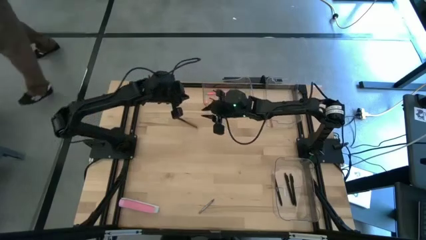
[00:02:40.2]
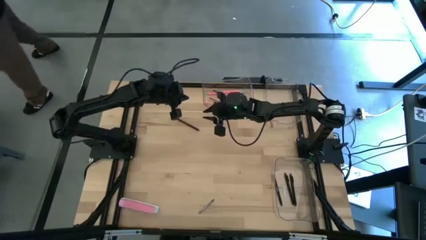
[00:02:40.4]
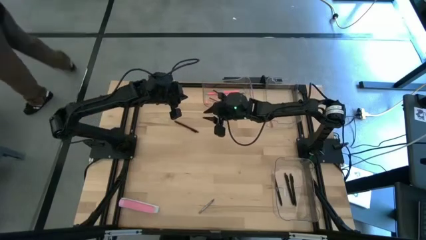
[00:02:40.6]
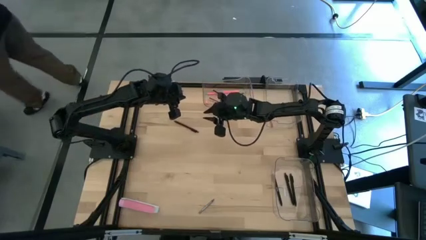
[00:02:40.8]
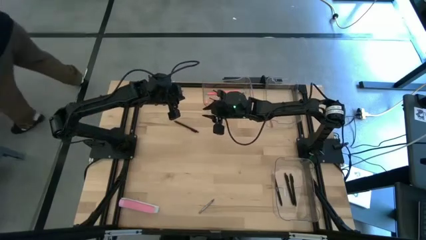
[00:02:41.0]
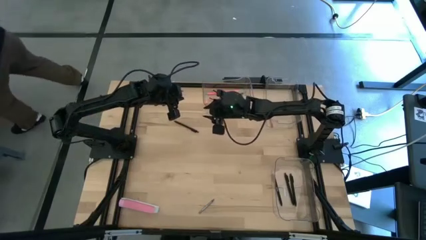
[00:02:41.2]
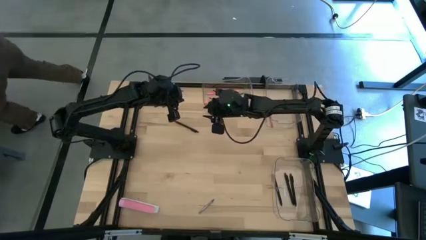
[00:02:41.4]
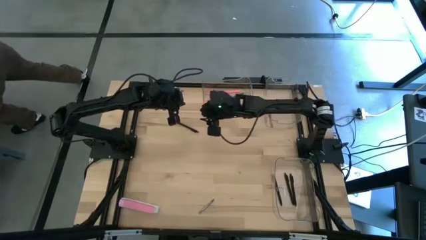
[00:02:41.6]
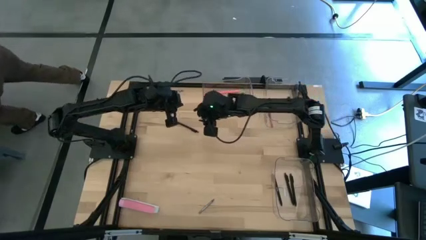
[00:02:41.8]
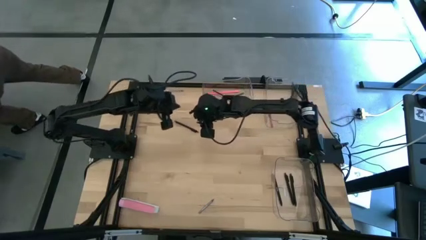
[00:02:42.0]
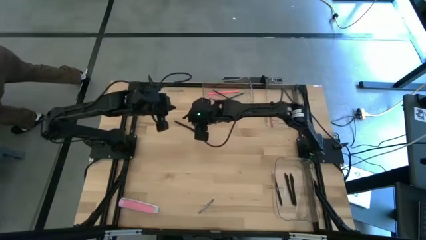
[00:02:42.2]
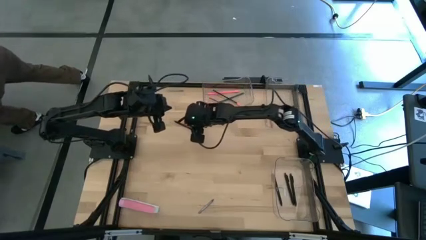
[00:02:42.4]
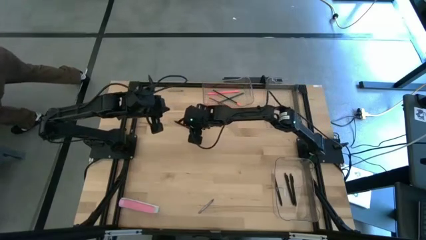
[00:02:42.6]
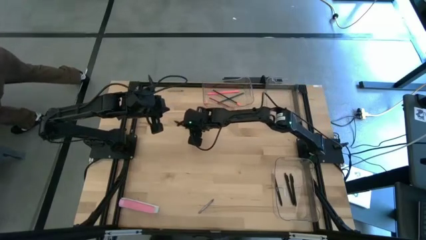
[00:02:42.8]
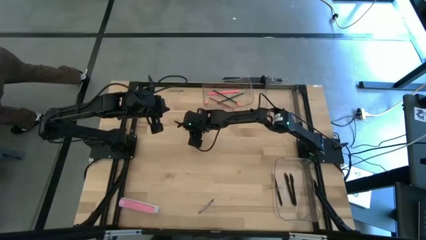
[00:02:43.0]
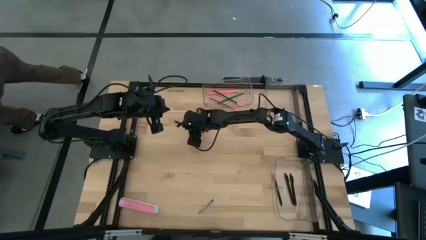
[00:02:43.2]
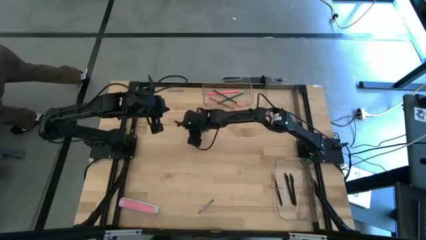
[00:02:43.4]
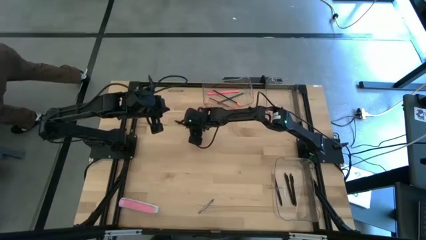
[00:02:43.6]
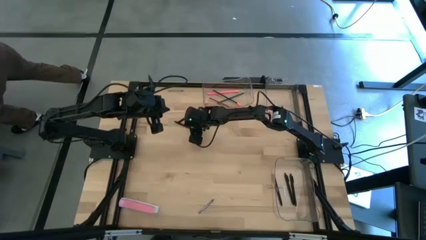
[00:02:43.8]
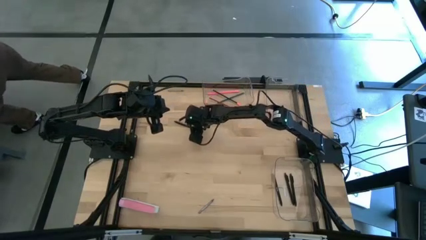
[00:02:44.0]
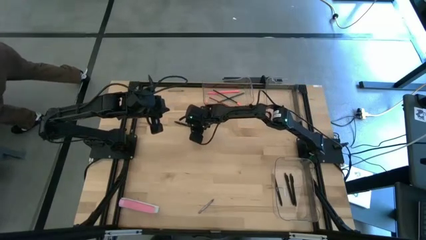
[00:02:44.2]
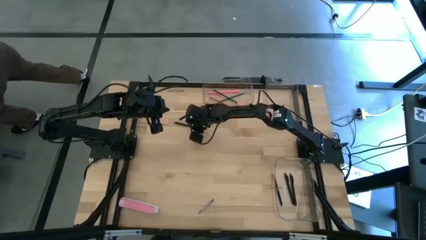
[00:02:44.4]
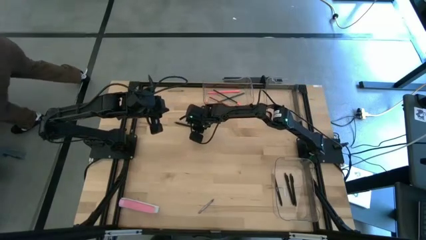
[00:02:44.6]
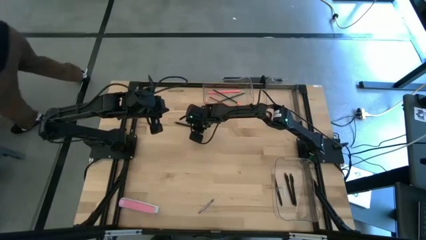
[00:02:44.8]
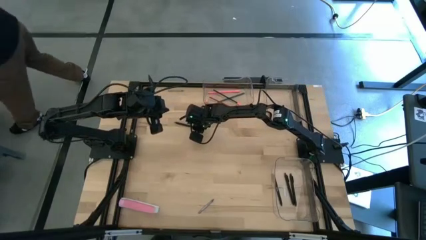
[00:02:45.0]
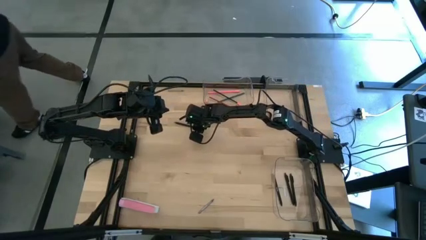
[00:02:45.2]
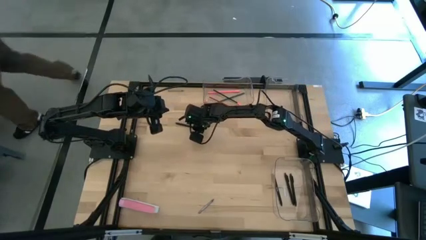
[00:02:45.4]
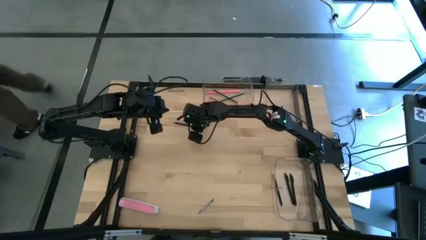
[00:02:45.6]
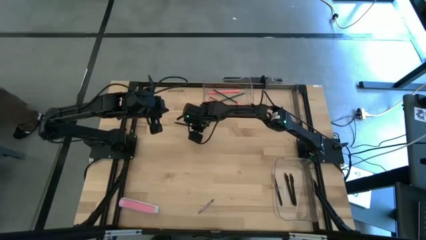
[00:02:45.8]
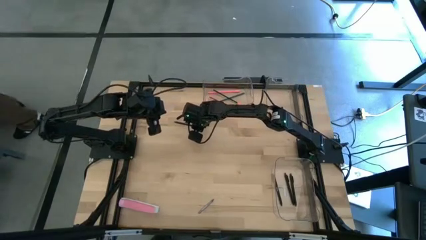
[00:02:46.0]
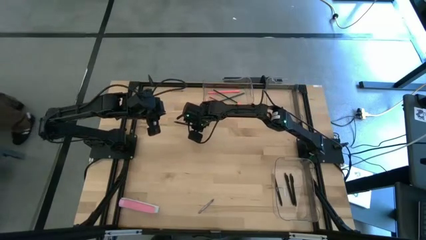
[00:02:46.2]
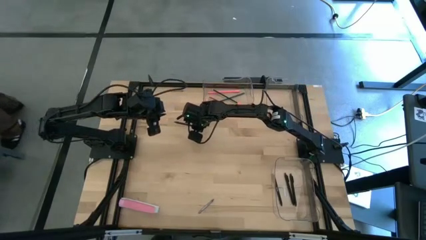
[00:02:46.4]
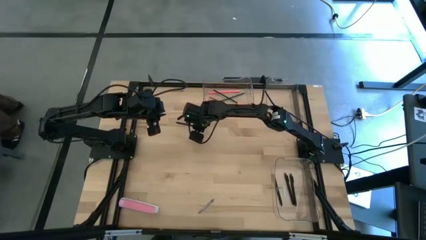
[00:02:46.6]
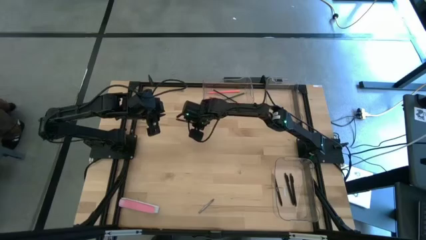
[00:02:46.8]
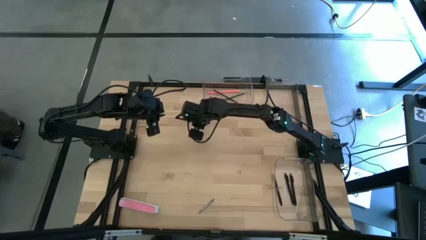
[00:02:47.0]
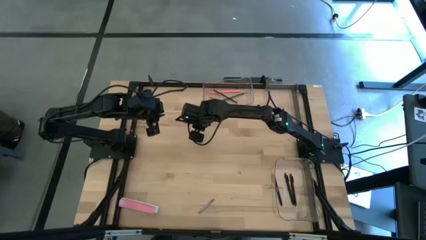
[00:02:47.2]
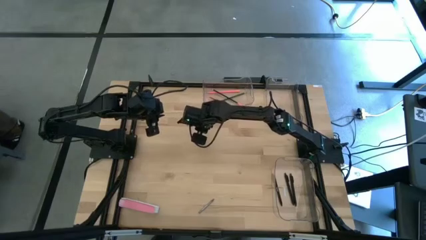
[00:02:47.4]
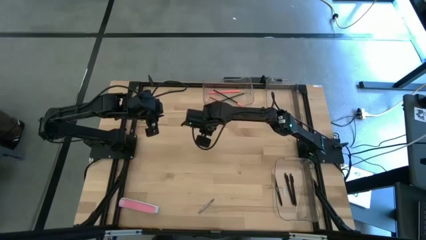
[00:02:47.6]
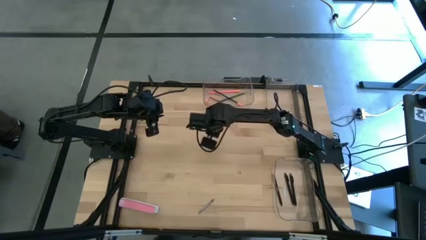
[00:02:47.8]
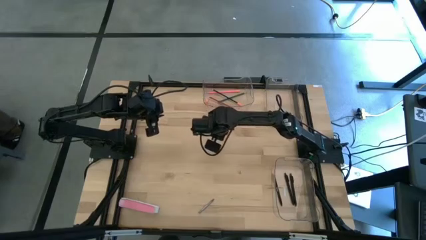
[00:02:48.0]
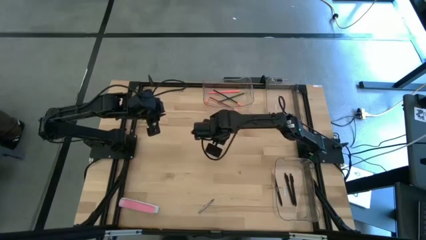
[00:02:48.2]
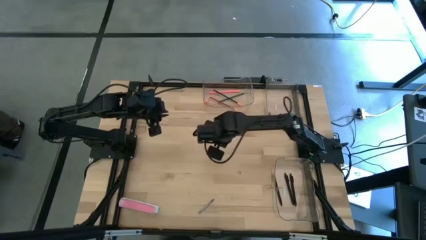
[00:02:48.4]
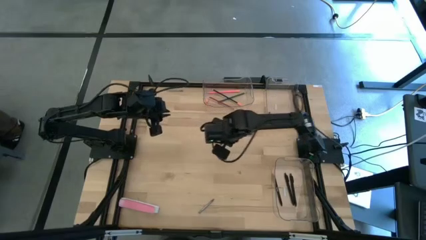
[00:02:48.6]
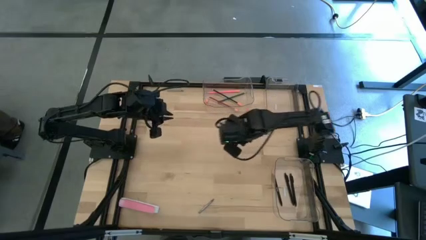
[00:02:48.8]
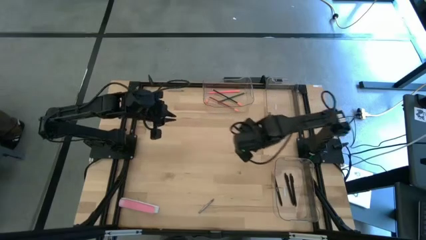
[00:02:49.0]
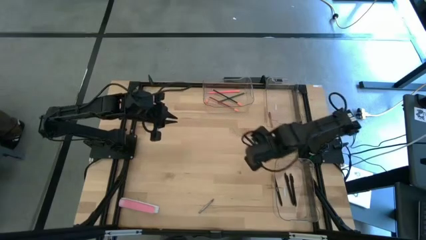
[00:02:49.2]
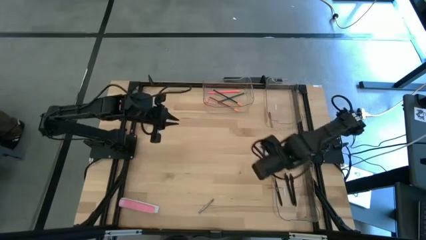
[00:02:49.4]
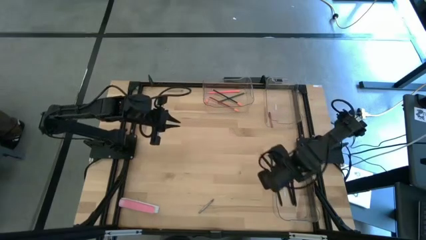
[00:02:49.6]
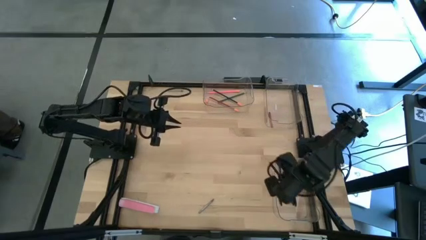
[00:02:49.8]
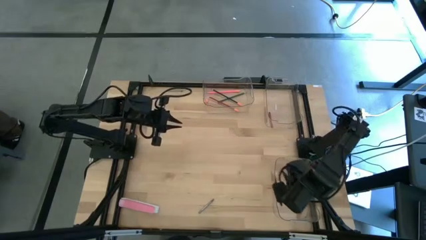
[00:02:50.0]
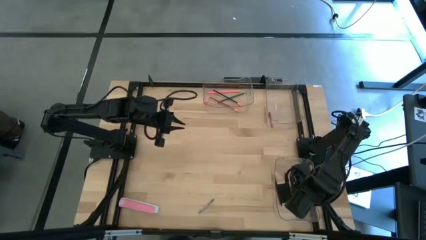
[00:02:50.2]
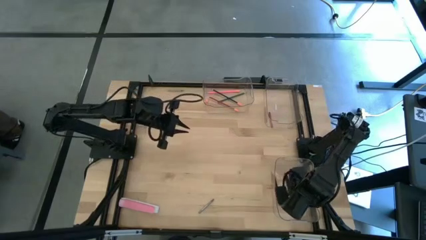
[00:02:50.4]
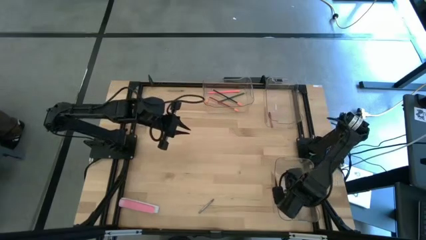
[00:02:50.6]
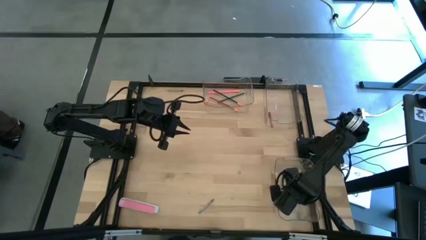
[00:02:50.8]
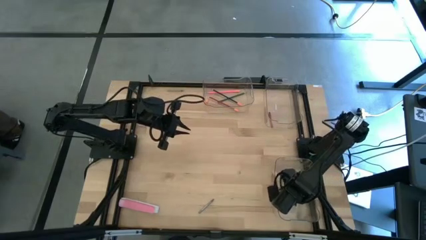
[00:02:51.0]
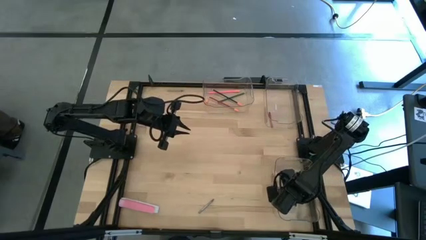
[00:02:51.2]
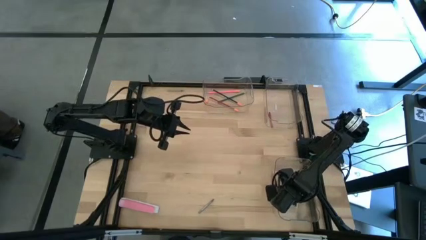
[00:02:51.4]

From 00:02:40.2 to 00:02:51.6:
Task: Sort crayons/erasers/pens/pencils in bins
Put the black pen into the bottom right transparent bin
